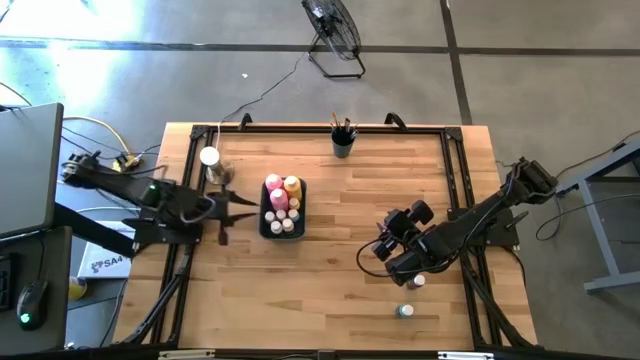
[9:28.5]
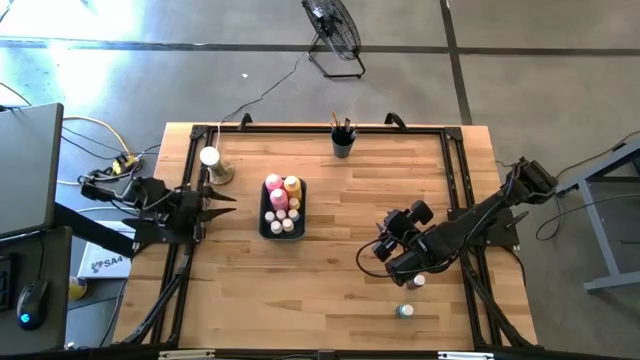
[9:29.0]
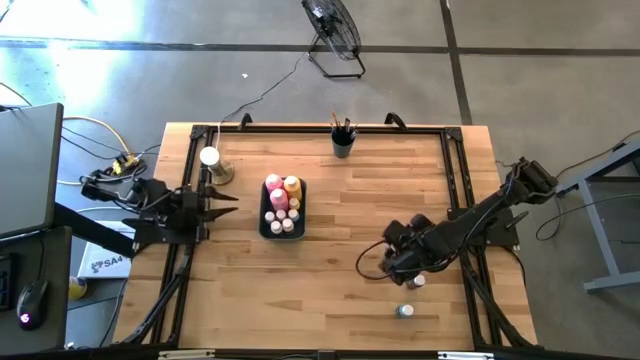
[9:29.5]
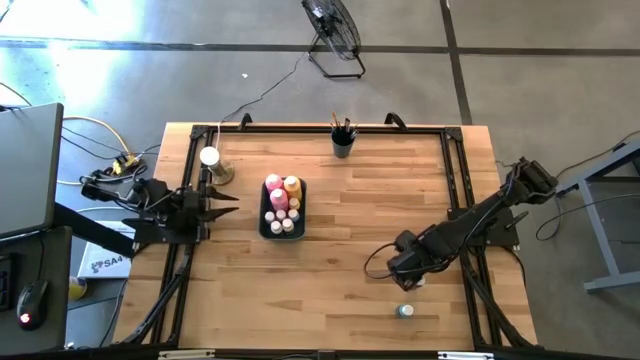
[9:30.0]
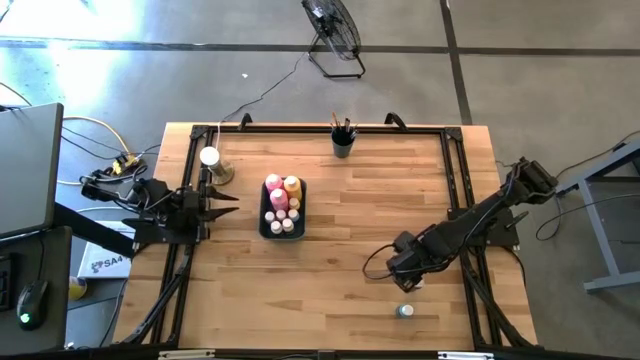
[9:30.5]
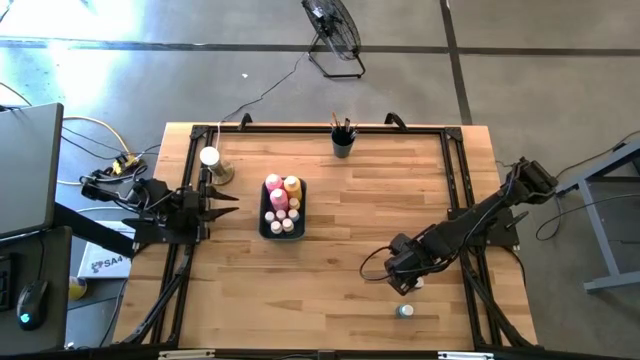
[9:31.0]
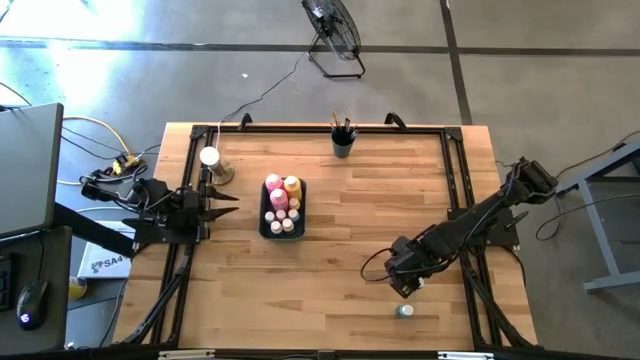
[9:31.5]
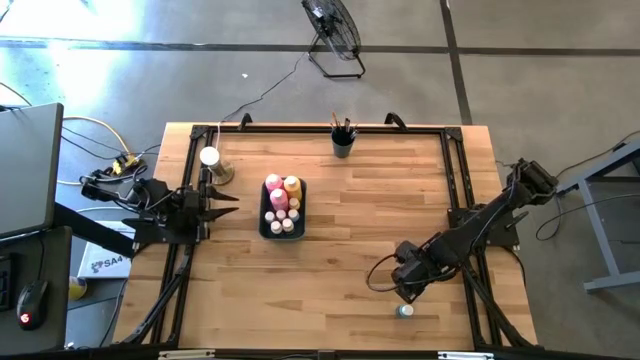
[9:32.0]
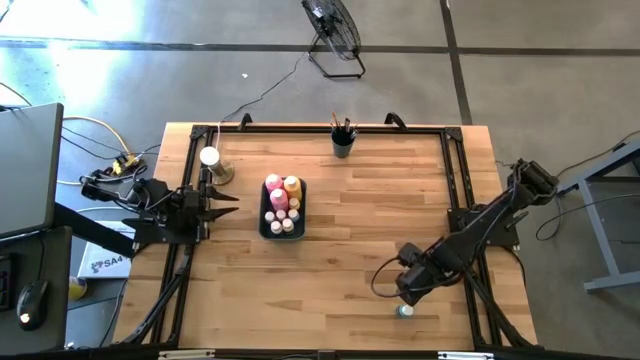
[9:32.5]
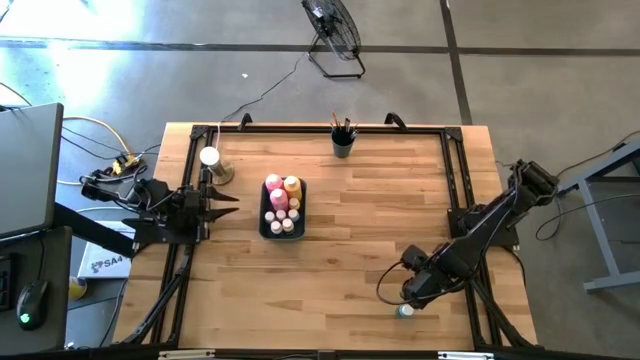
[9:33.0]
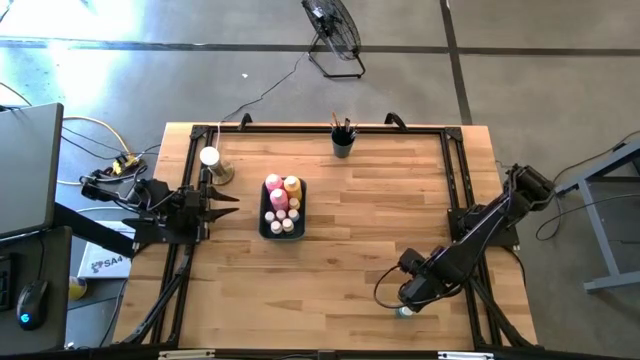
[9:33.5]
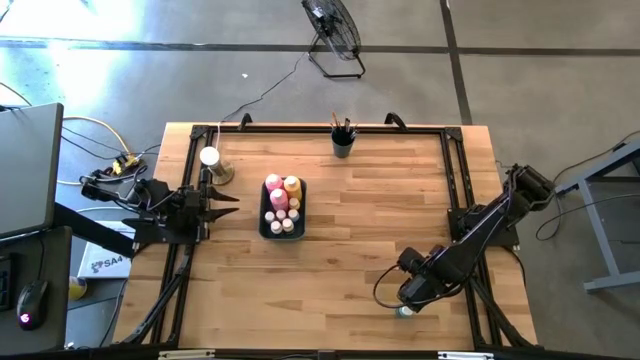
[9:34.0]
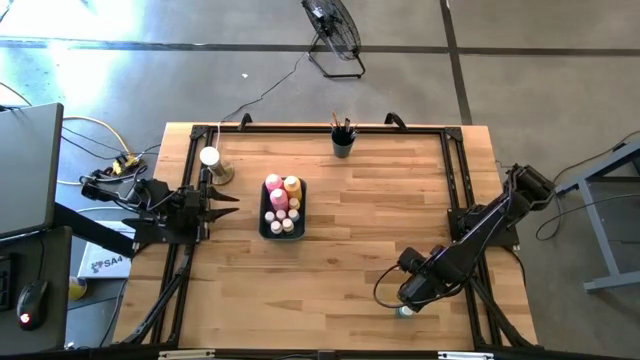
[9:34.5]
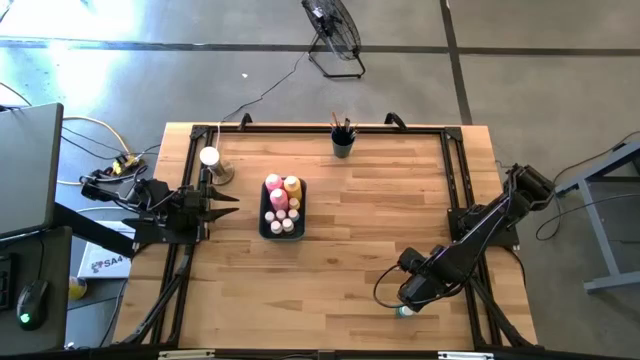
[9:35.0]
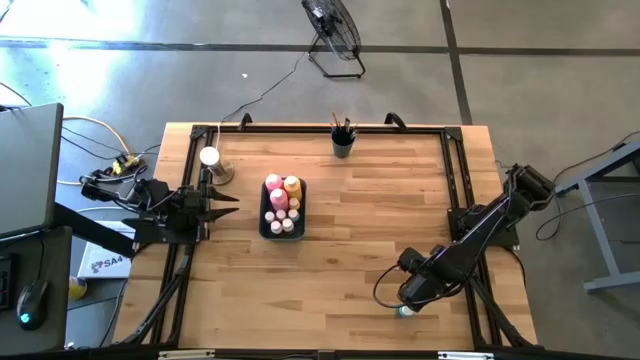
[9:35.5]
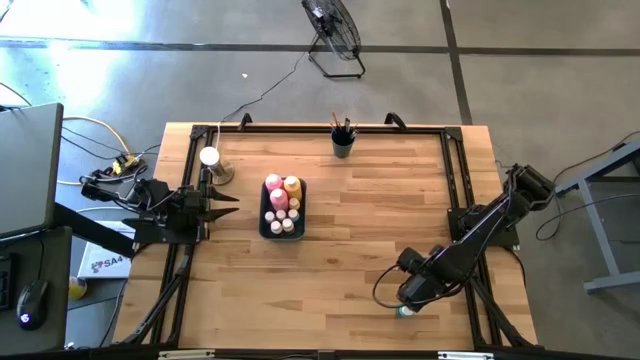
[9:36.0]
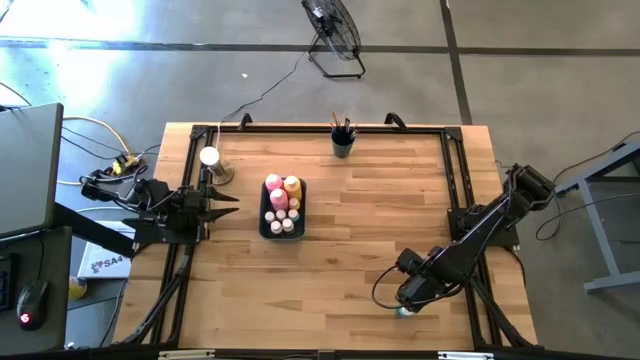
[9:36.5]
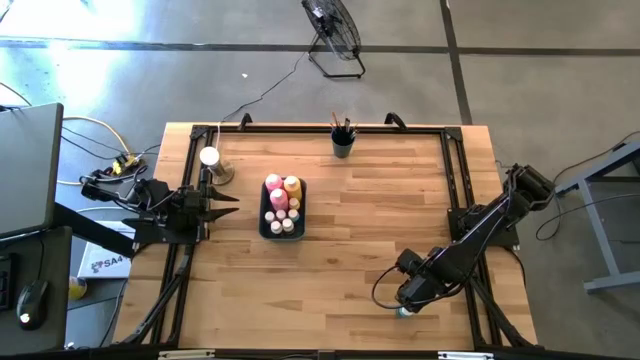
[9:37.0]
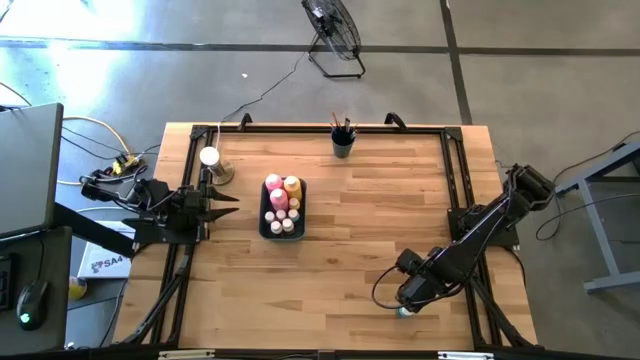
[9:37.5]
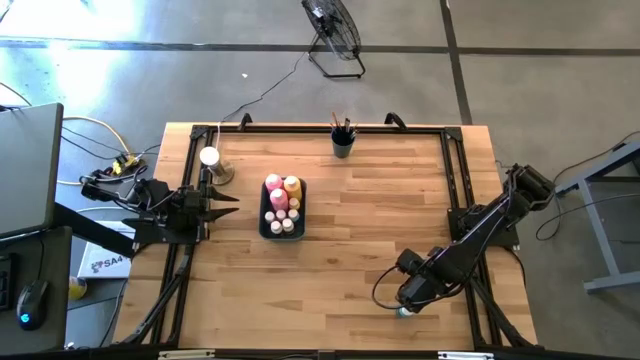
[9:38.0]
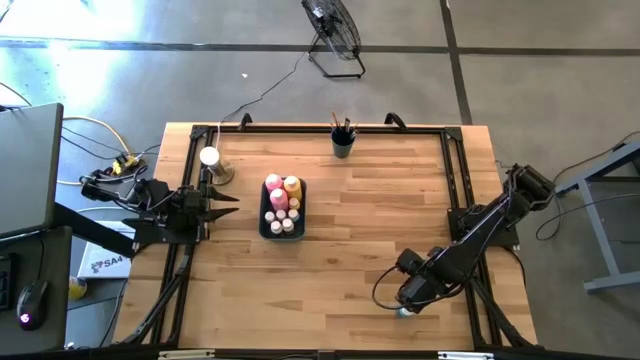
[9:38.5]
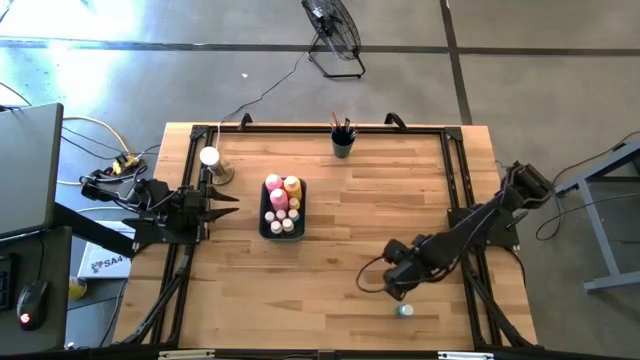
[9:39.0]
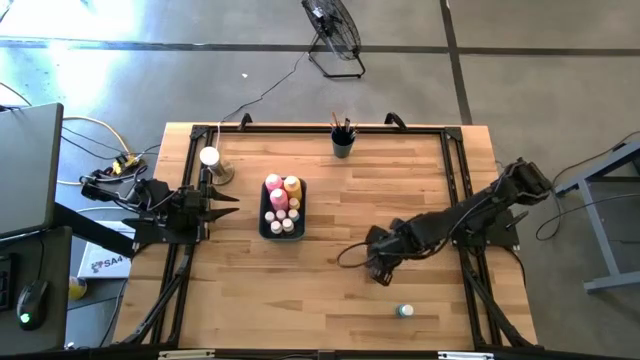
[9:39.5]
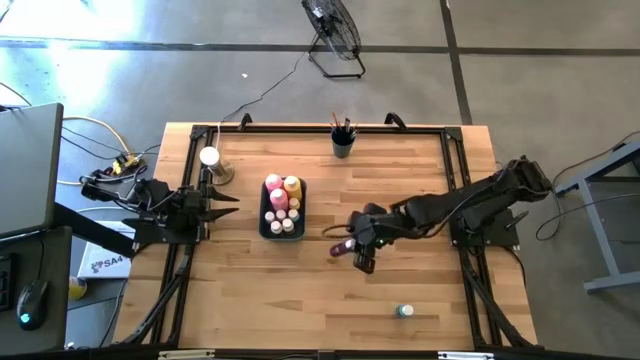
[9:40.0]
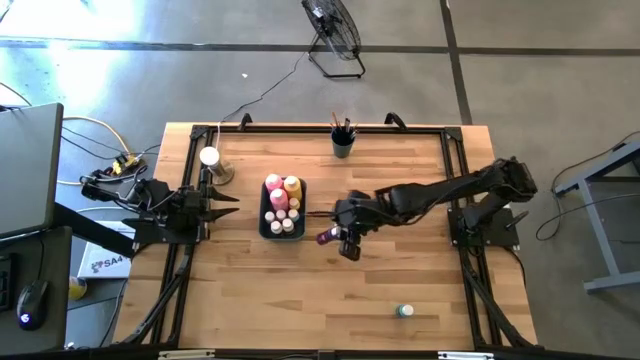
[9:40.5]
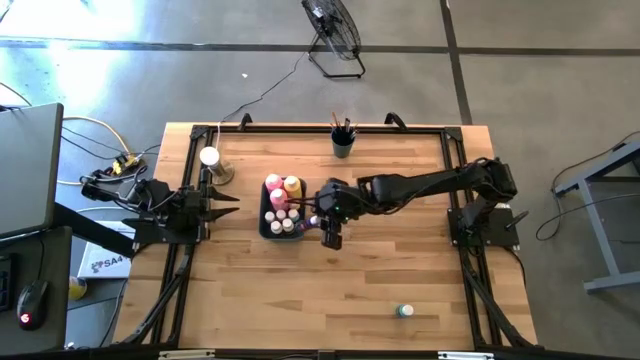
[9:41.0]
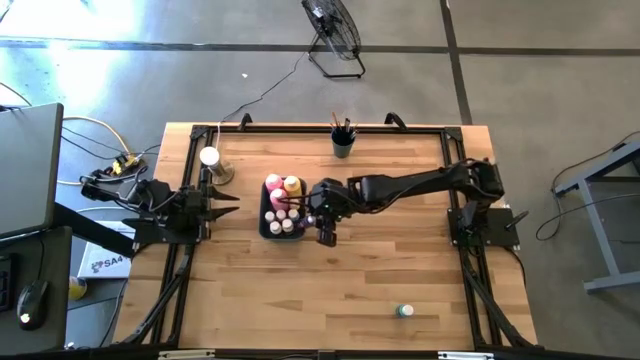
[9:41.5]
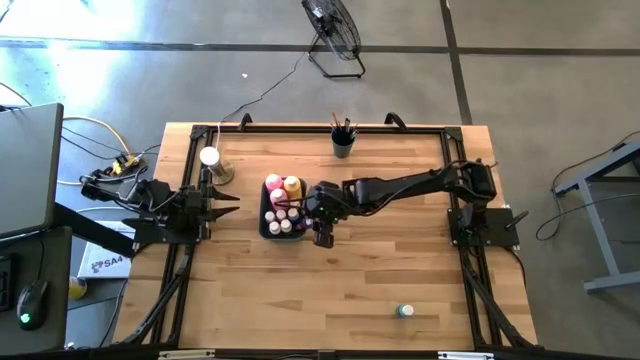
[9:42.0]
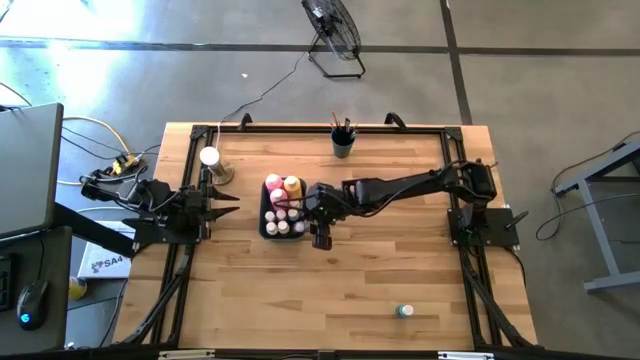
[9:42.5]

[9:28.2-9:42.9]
Task: Pick & Place Paint Supplies
Put the blue paint bottle into the green bin
